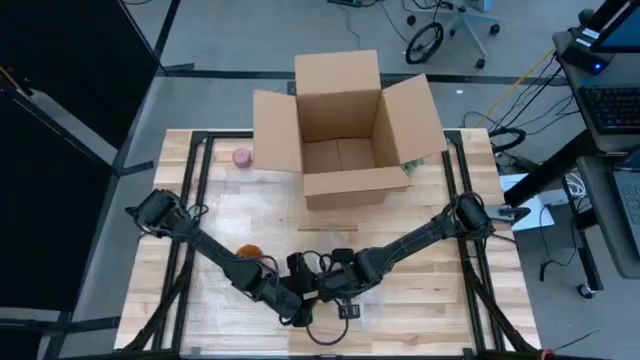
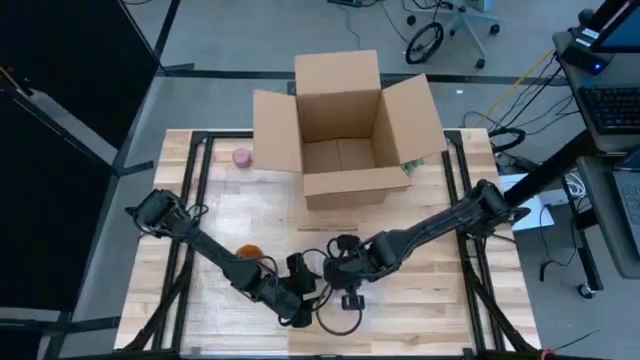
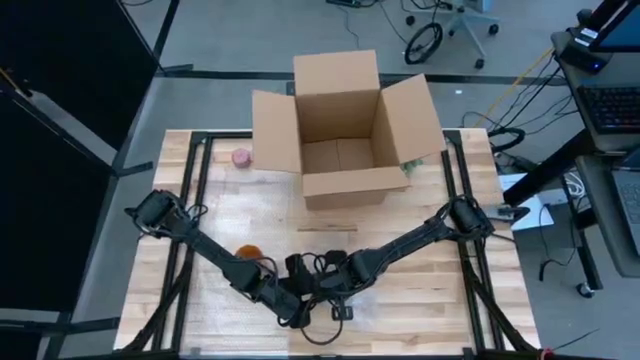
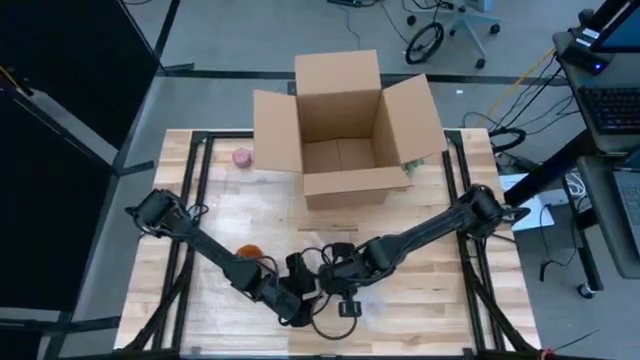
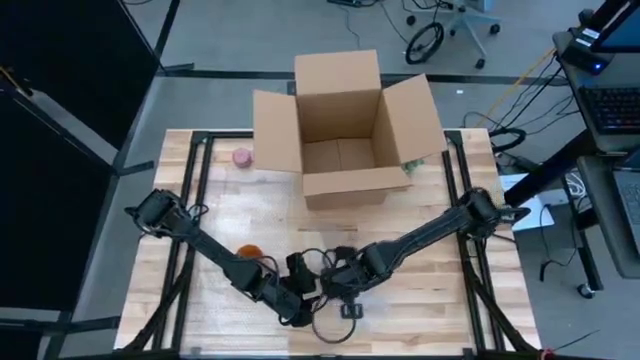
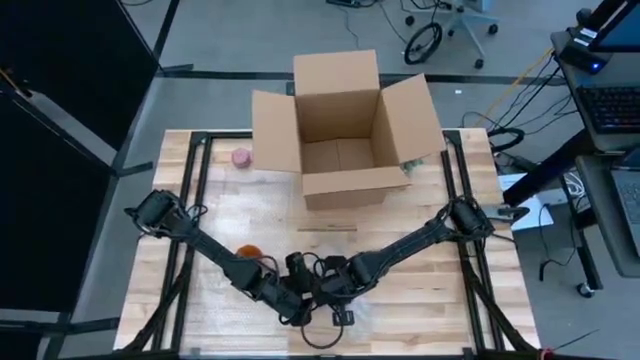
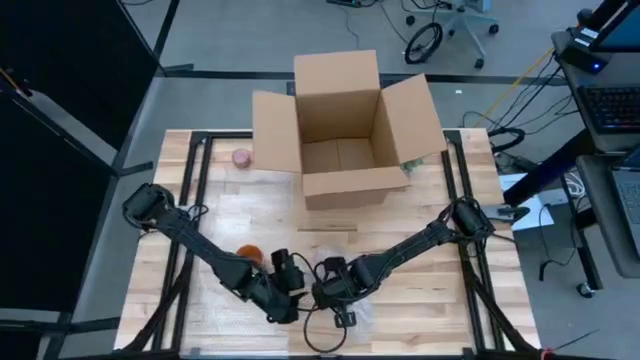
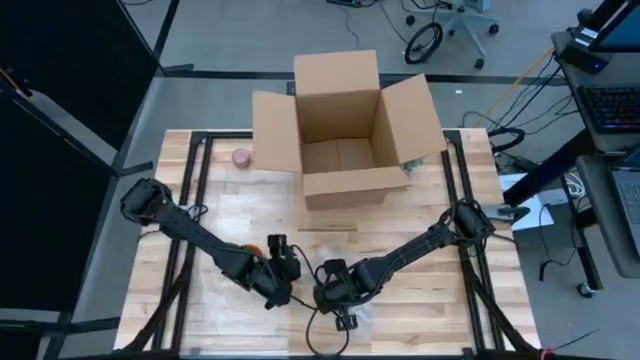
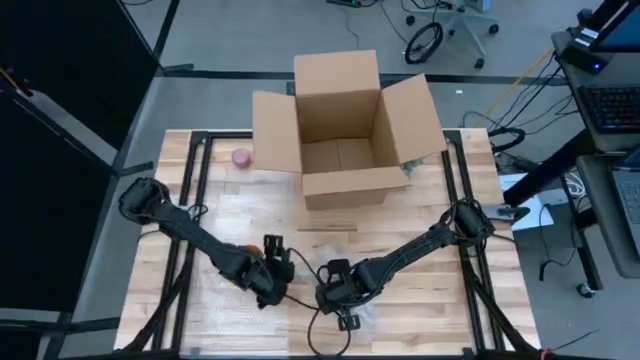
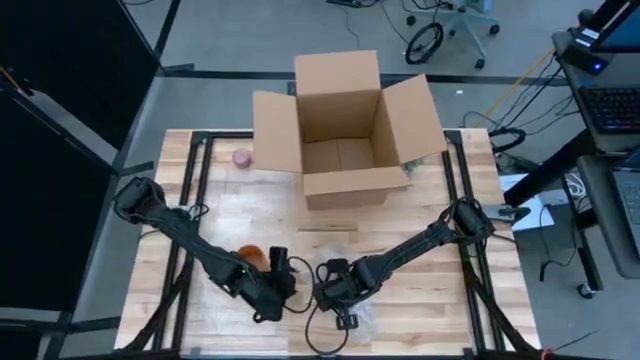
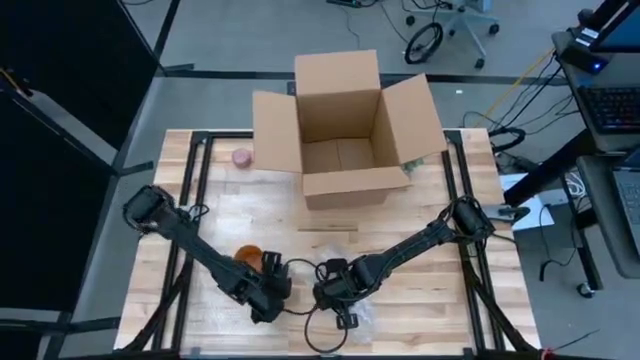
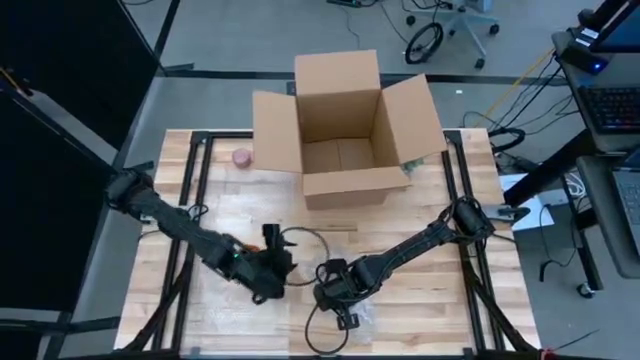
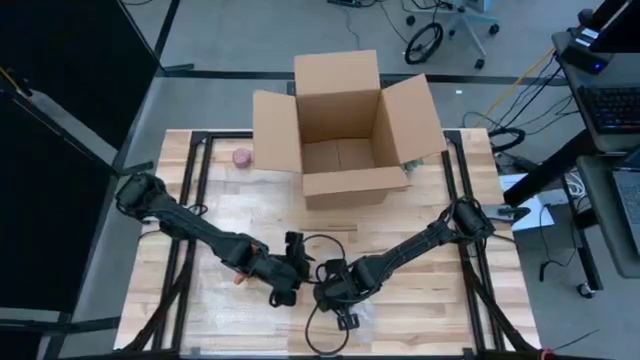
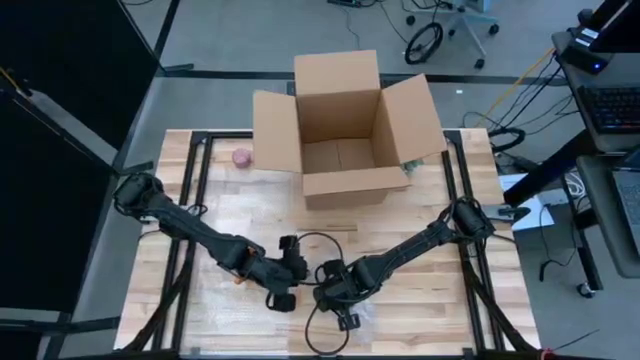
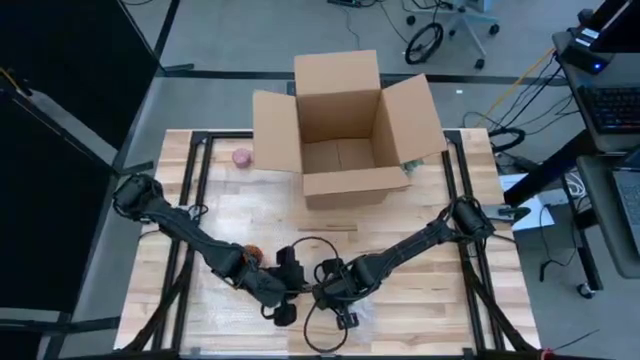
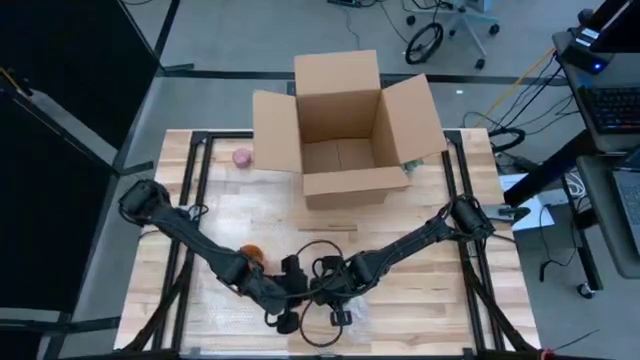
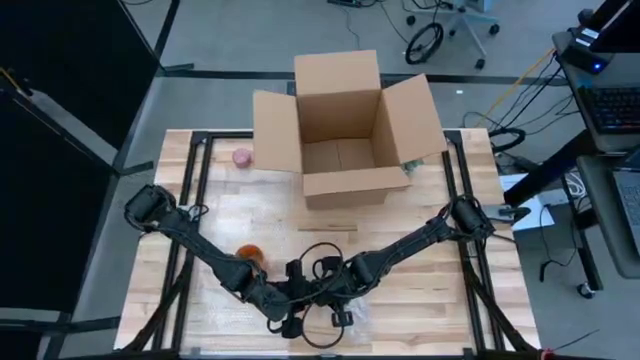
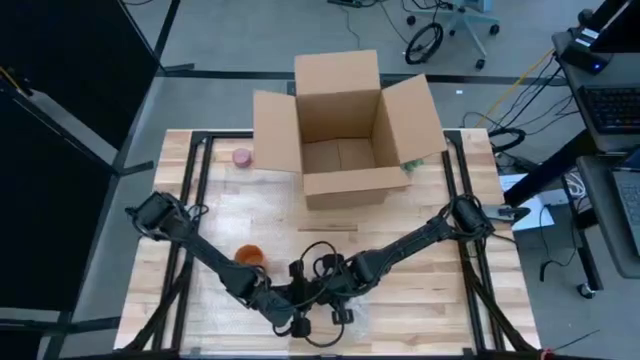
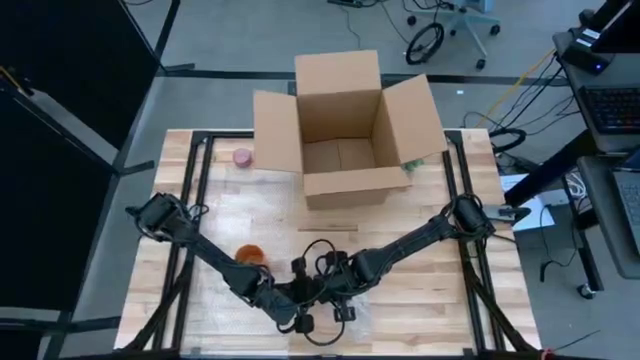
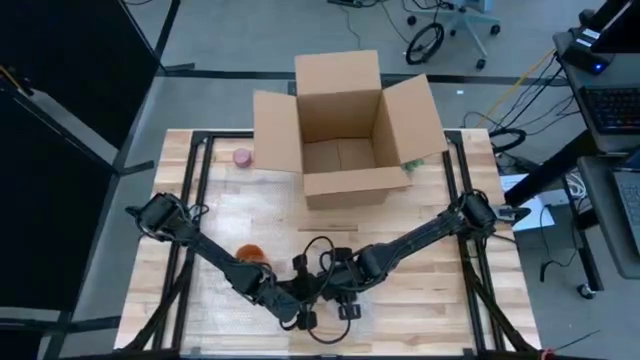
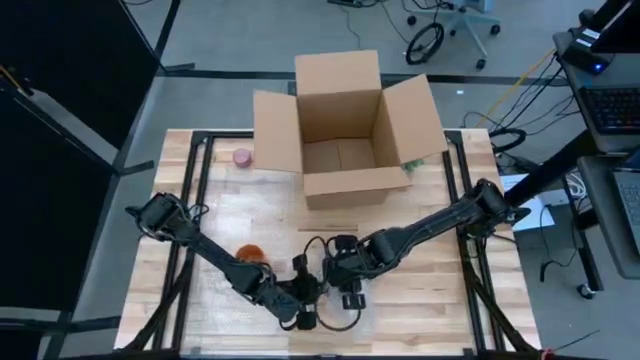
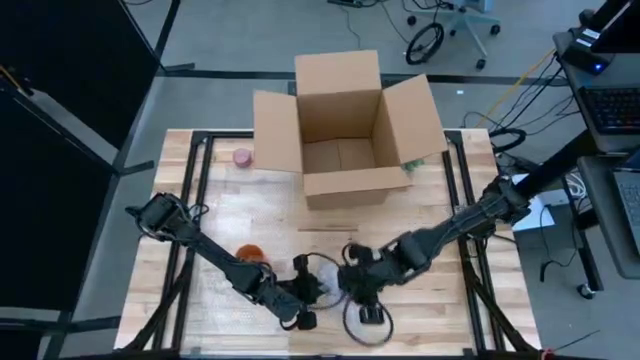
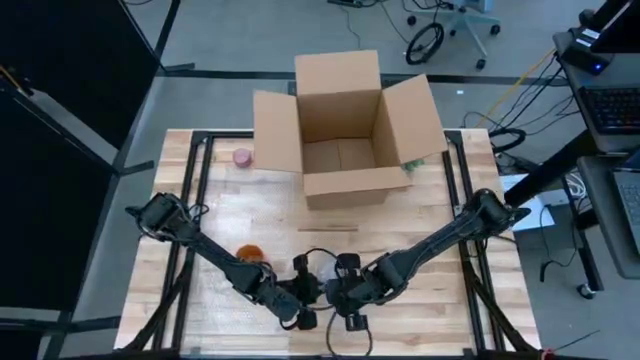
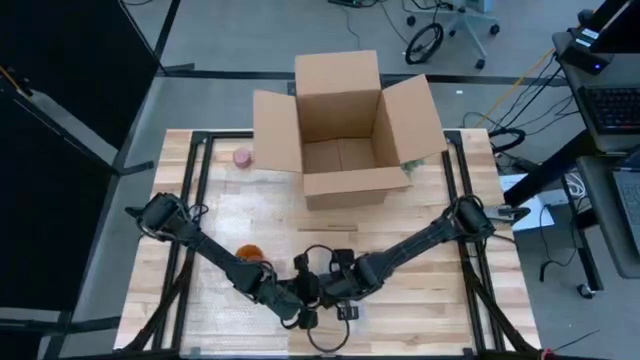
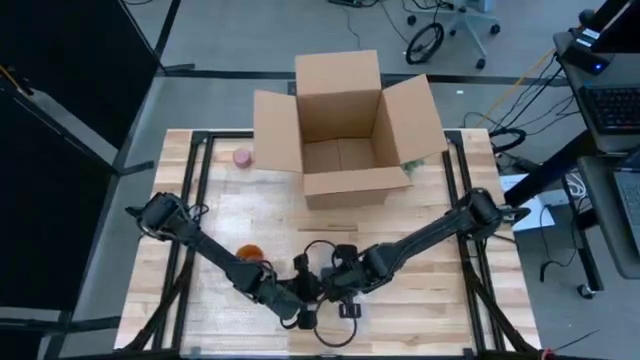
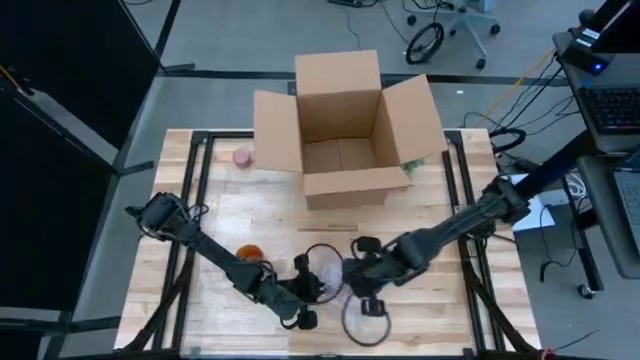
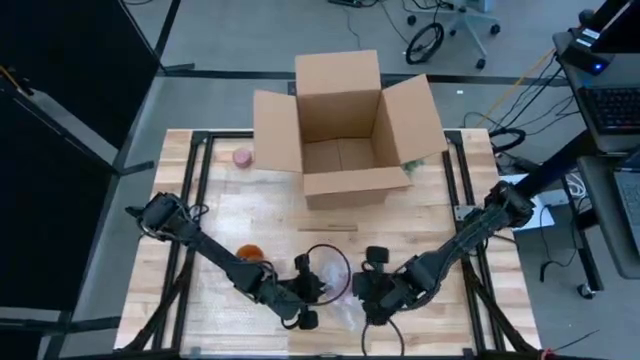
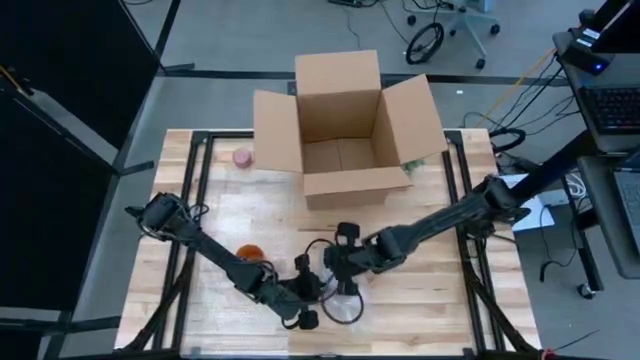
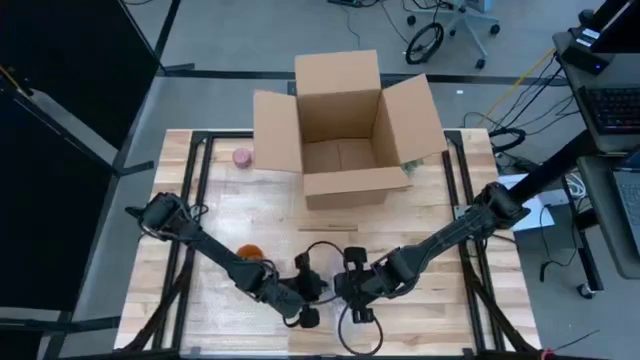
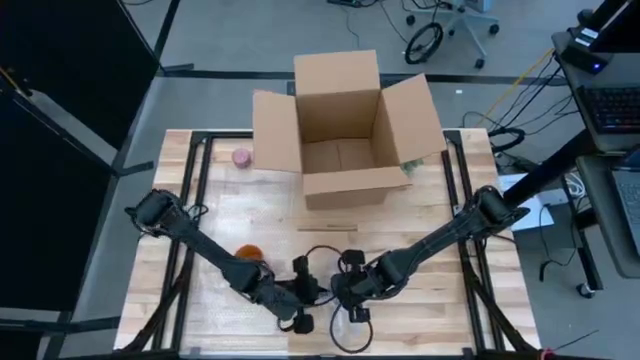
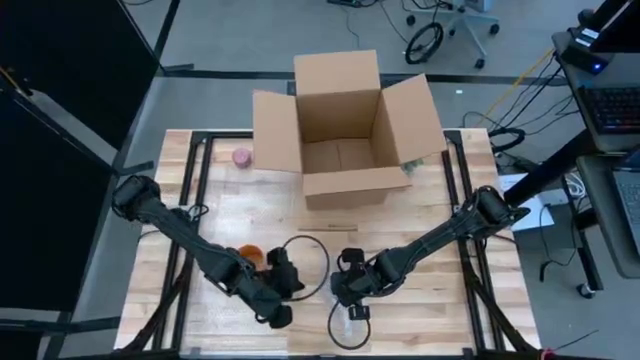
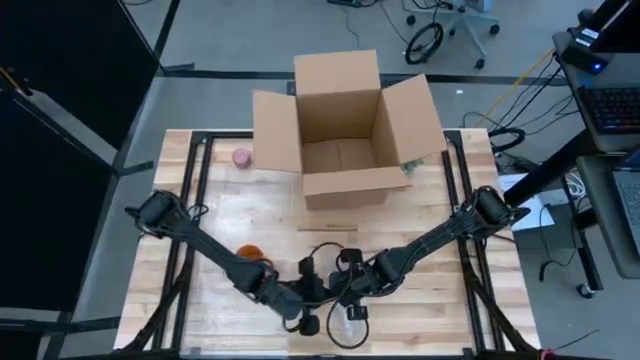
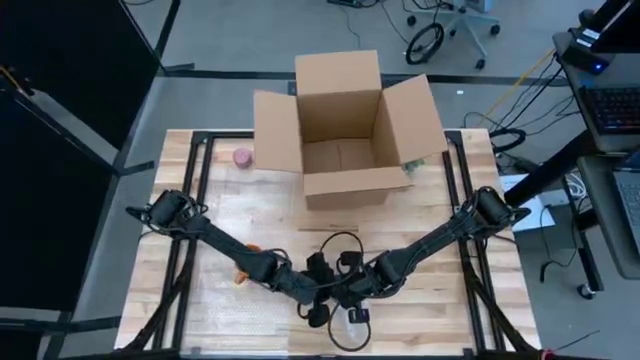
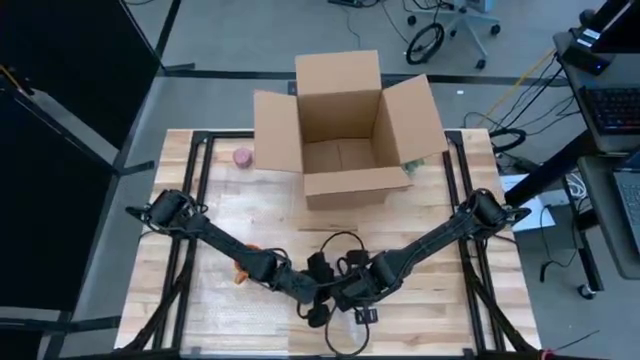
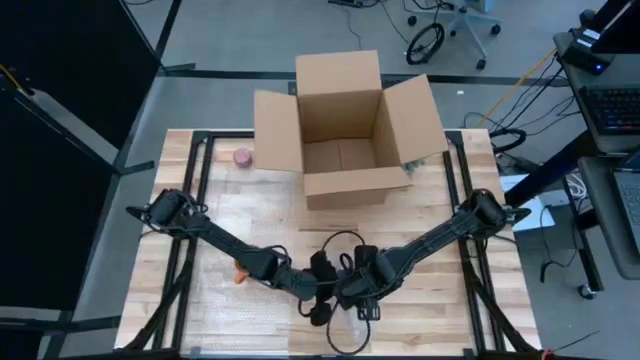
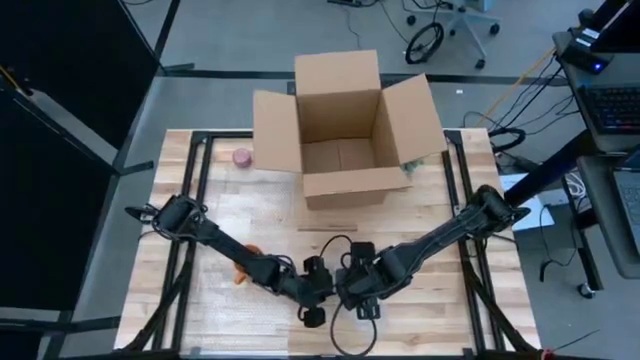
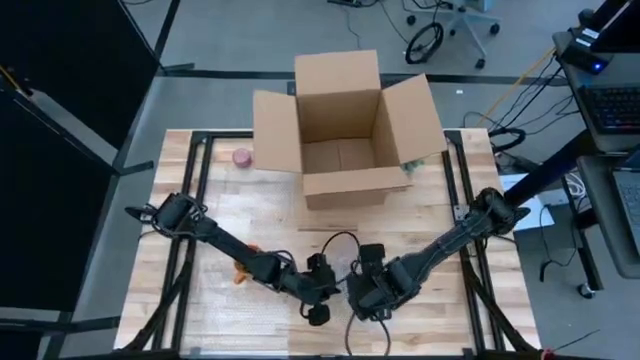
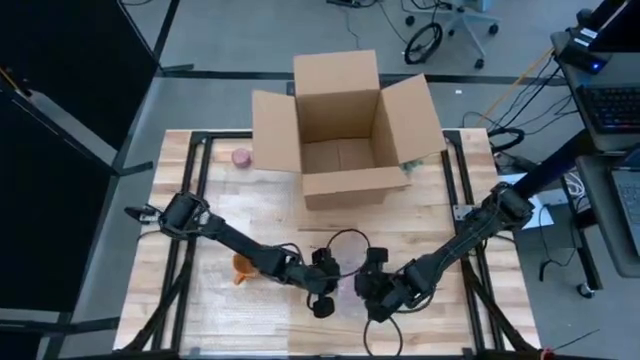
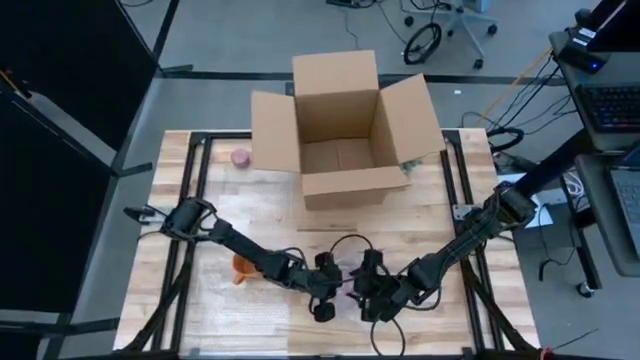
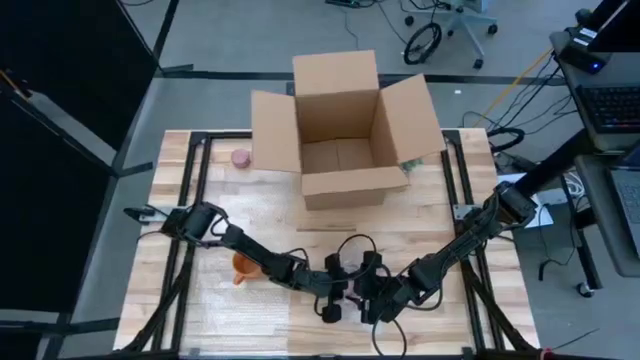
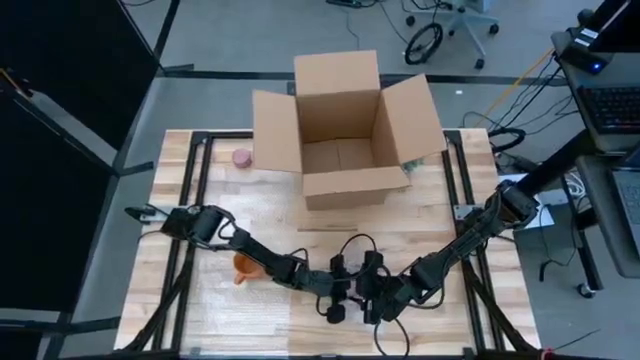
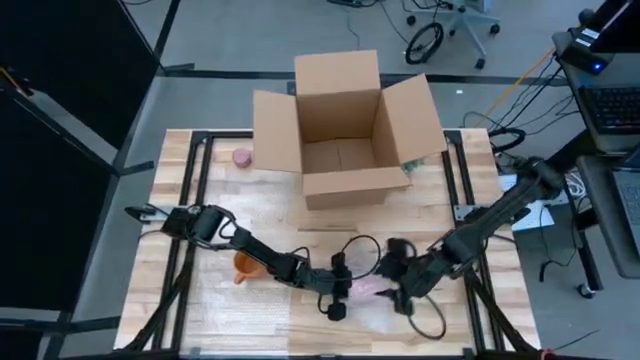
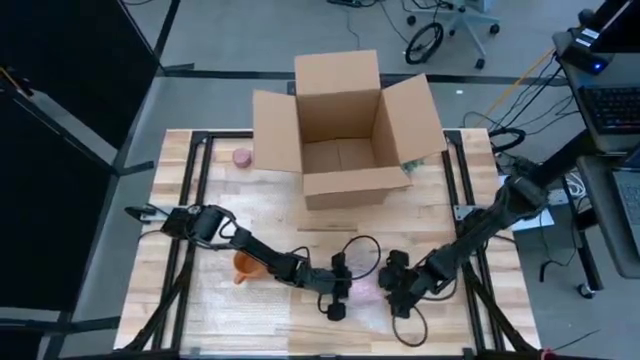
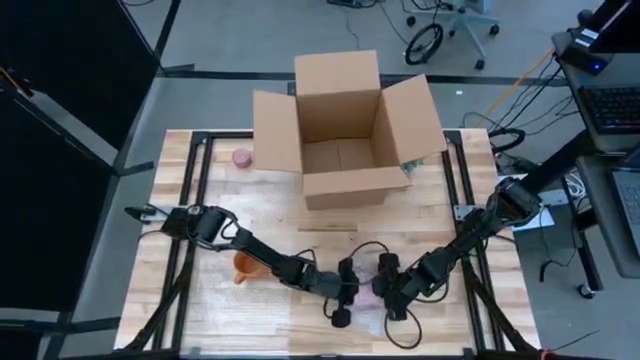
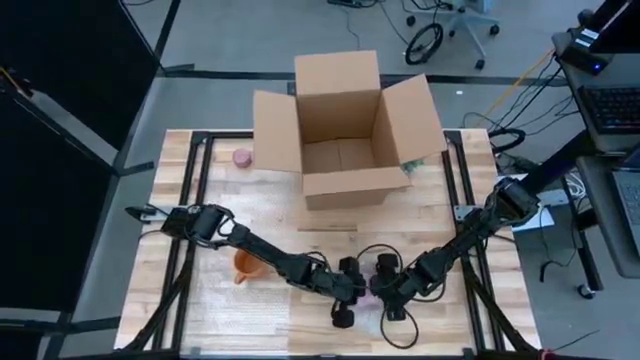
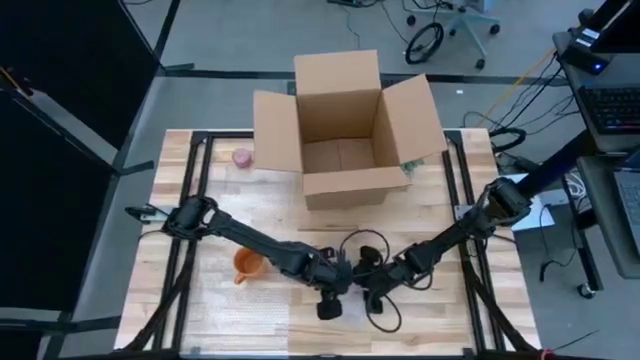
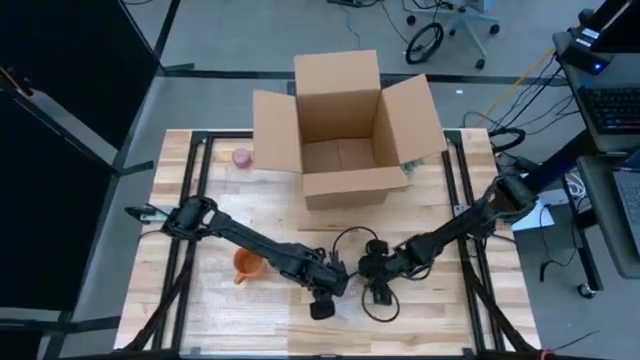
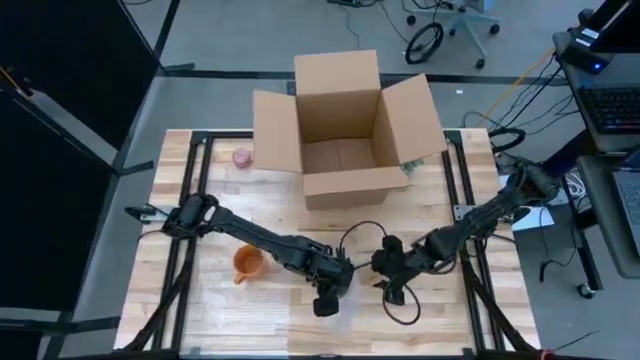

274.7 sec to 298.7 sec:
Task: wrap mug
Wrap the pink cup with the bubble wrap
